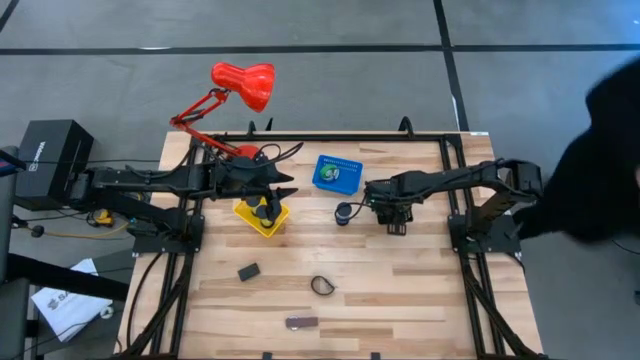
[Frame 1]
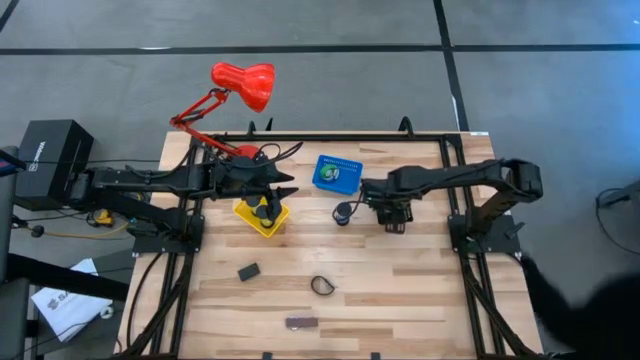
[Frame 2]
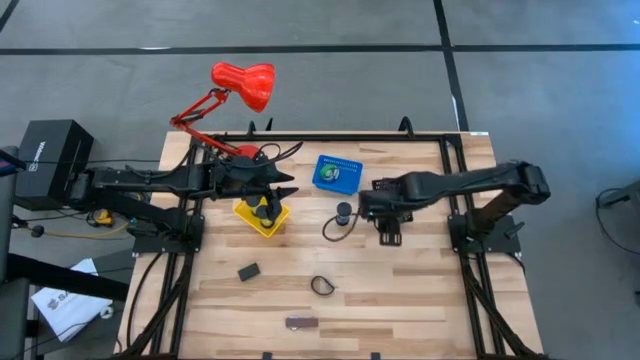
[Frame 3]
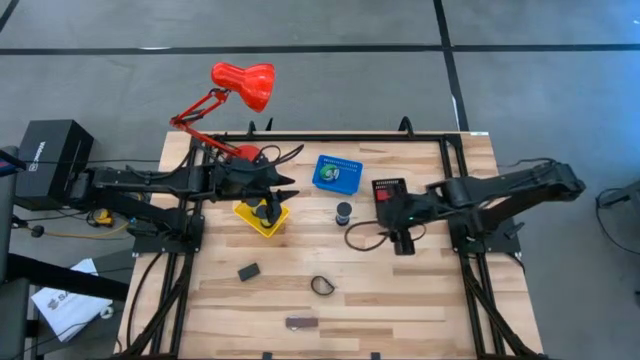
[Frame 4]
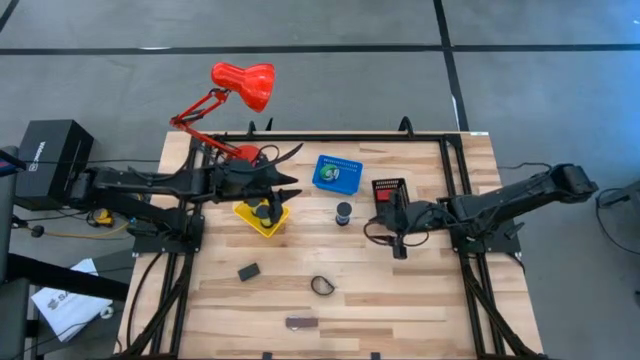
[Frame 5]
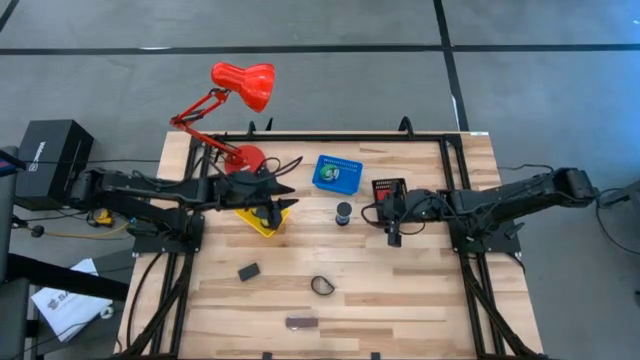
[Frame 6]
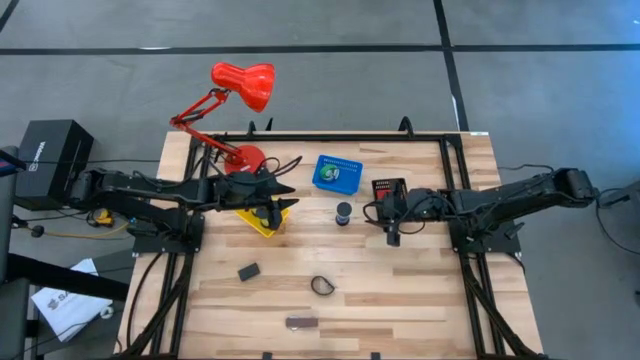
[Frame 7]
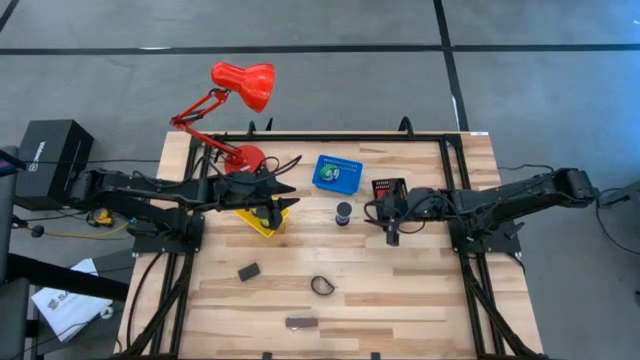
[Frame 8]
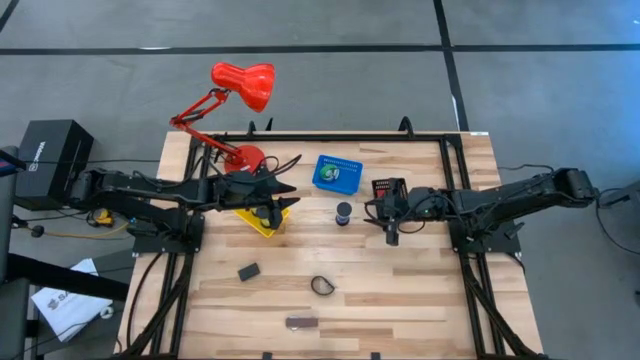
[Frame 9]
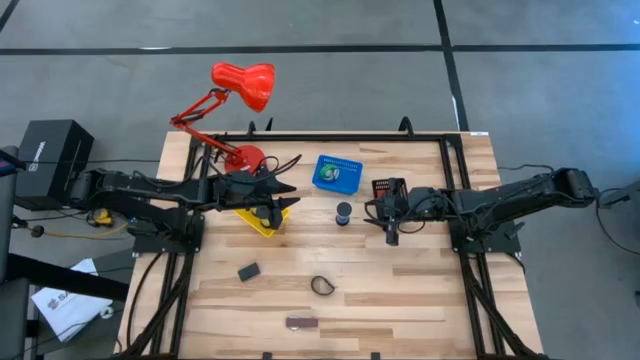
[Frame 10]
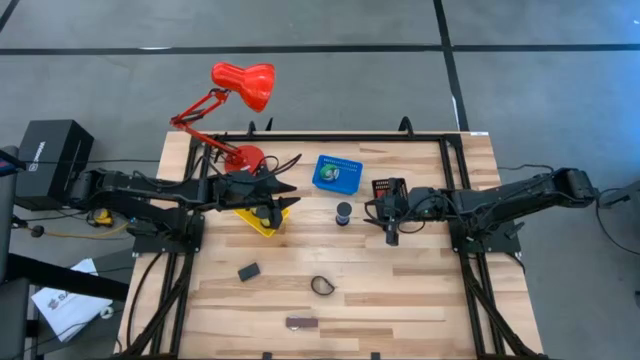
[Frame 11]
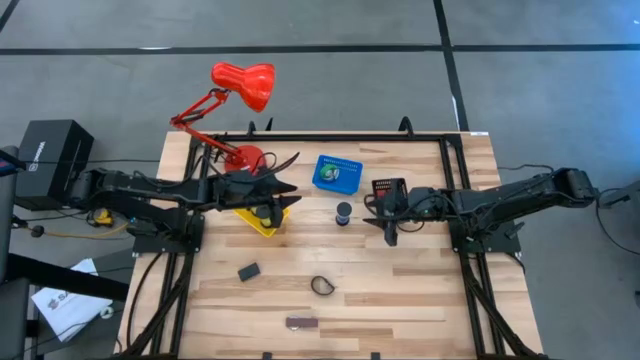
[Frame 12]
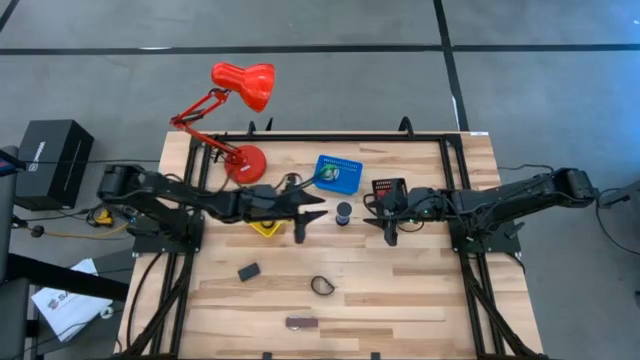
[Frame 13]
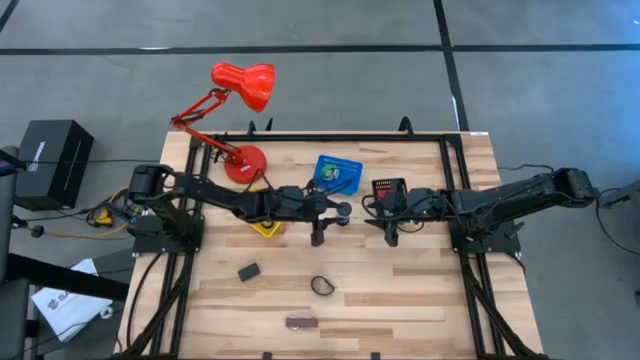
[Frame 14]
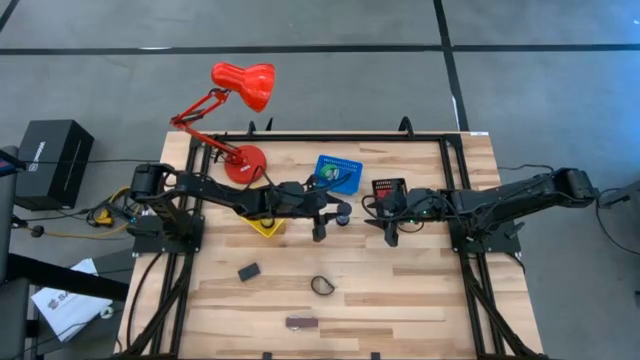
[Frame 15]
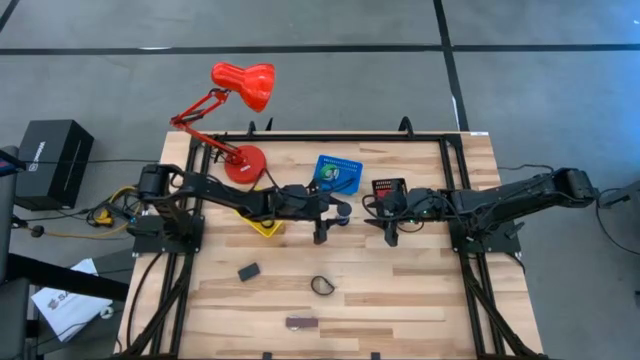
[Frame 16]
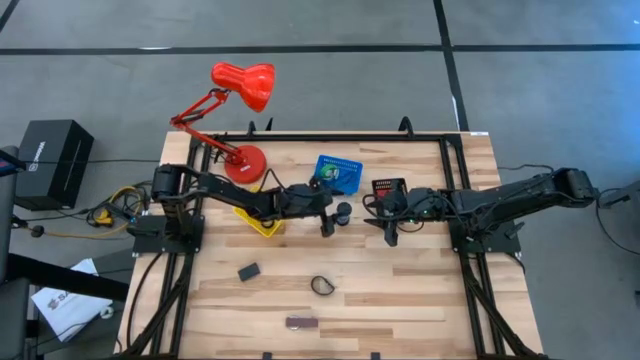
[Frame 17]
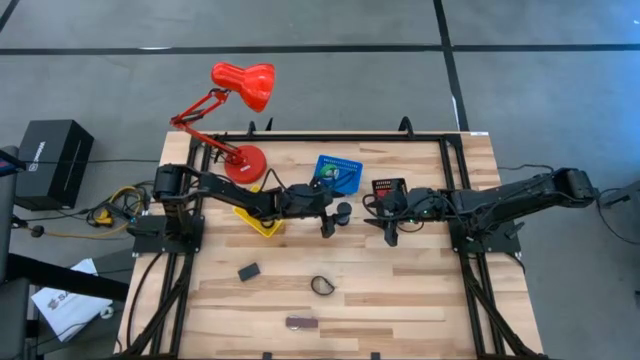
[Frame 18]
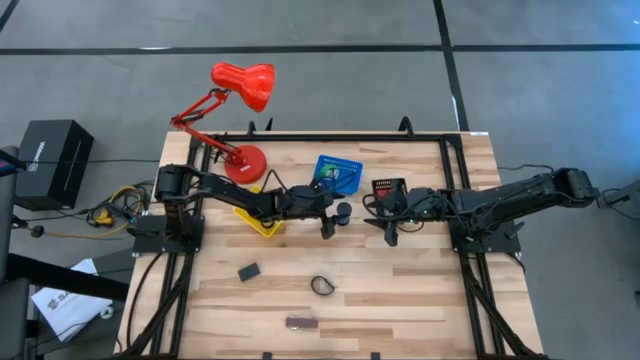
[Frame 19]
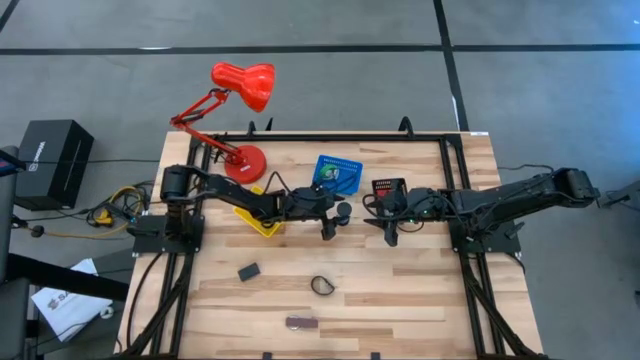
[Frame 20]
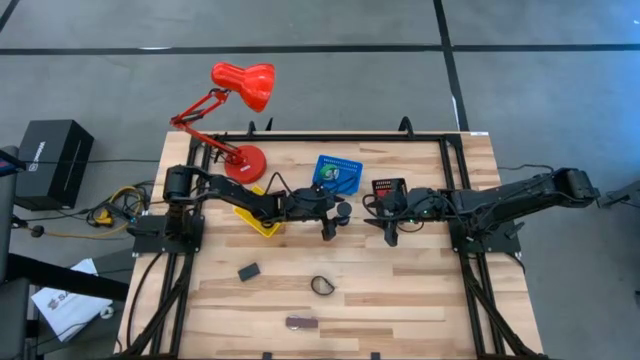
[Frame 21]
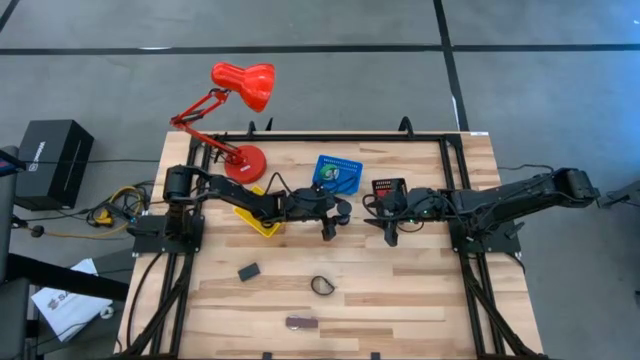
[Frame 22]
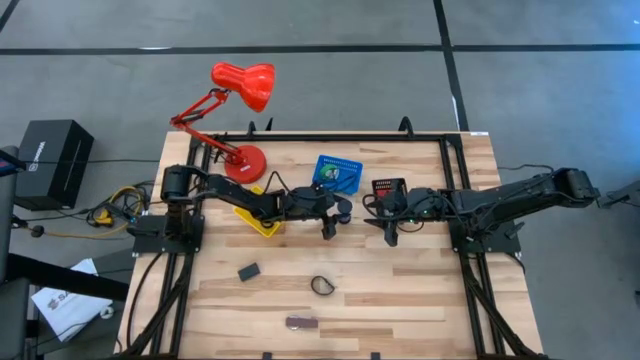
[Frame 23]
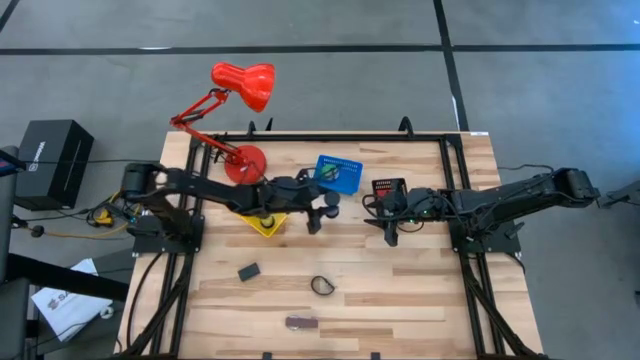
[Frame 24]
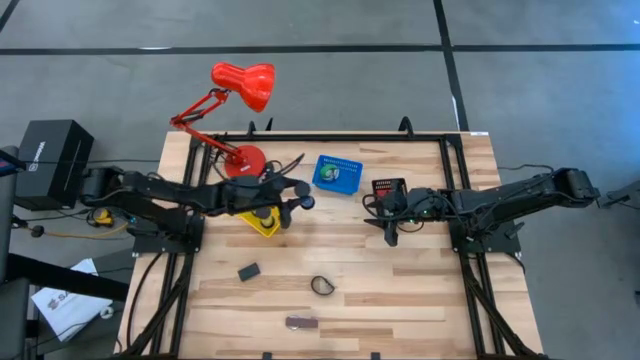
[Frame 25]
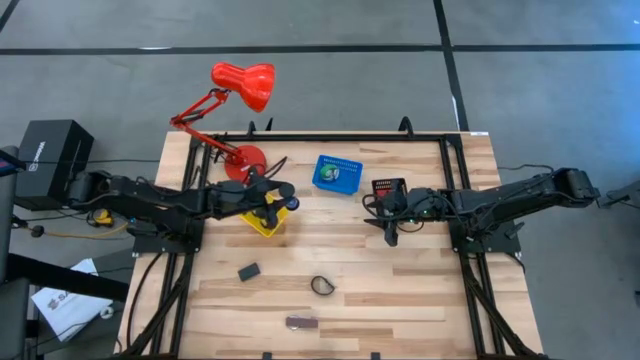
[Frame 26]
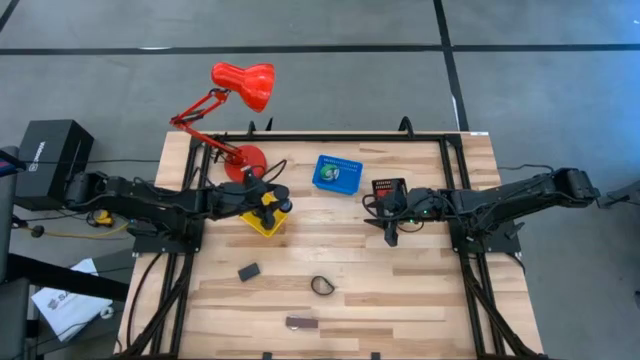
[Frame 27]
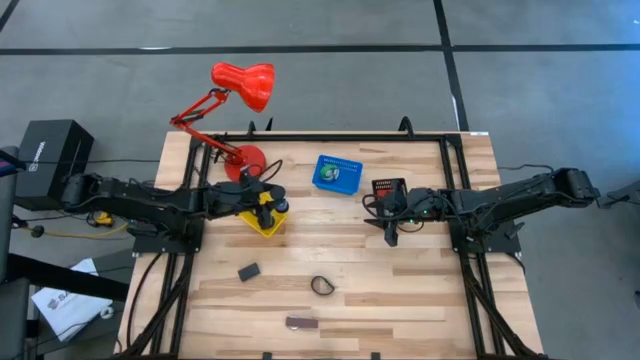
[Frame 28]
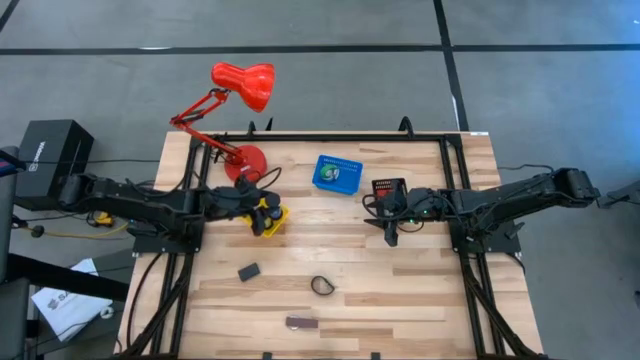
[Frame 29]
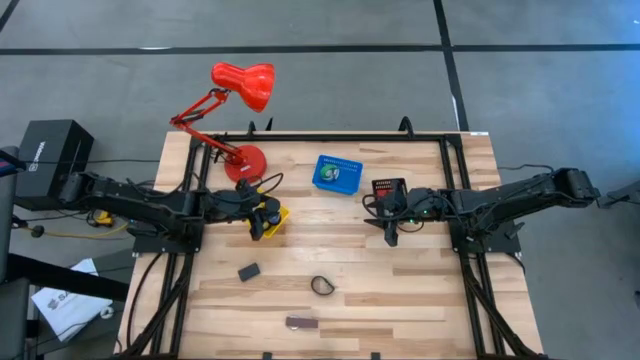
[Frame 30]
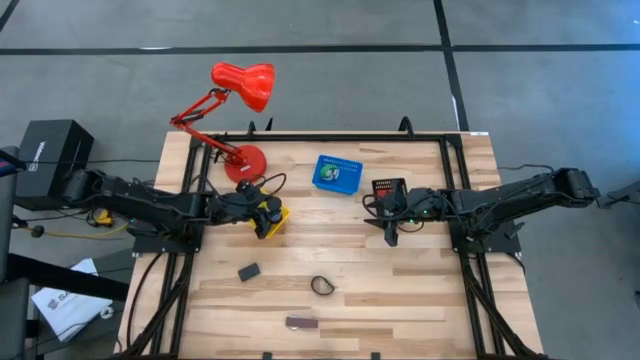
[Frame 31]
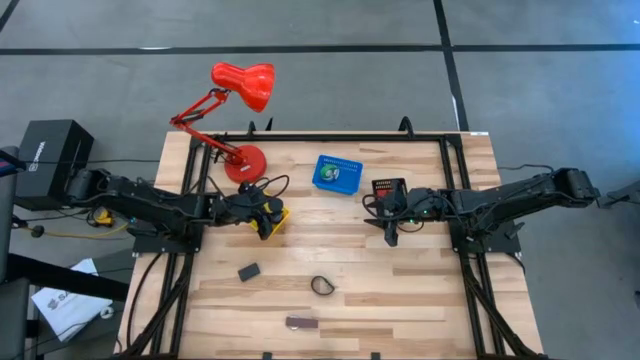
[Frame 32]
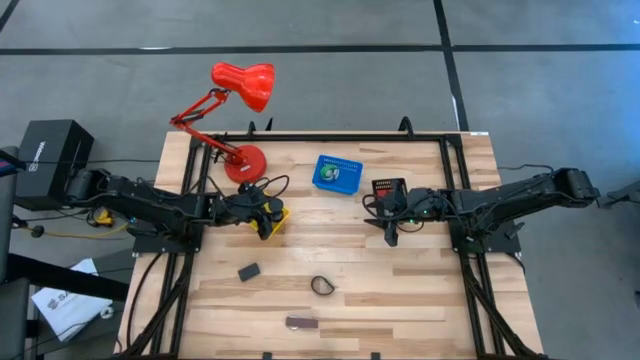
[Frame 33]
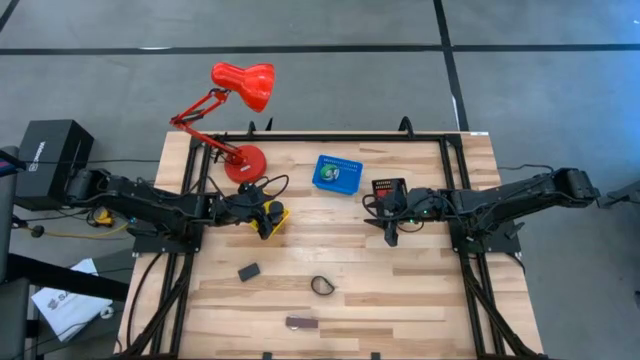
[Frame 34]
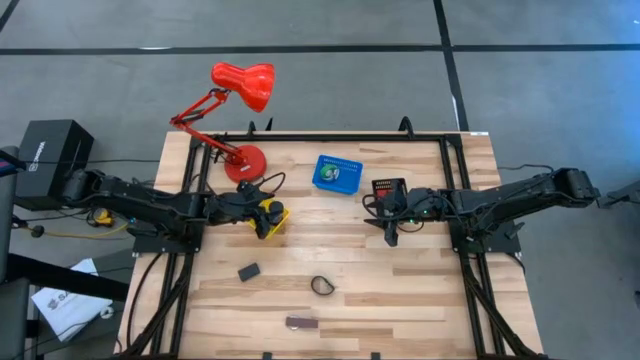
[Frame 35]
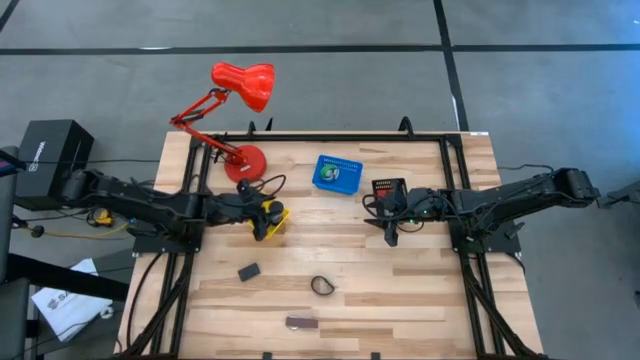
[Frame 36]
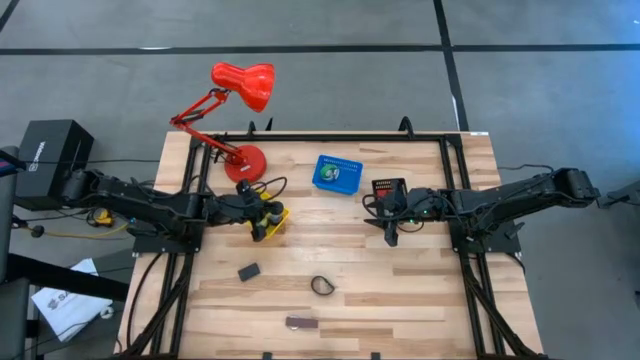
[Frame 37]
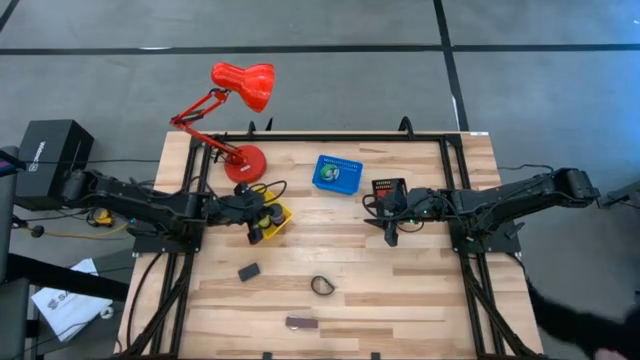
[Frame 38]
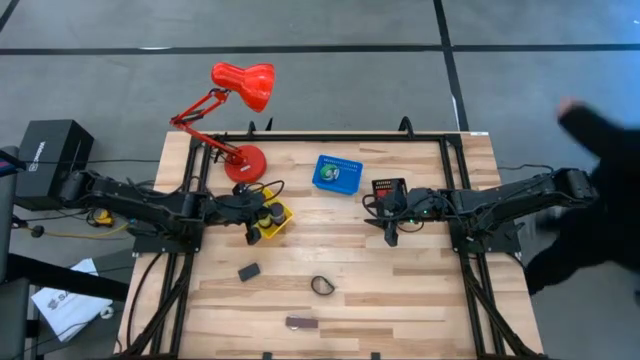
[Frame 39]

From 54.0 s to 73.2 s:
Task: Pick & Place Office items
Put the blue hourglass into the yellow bin

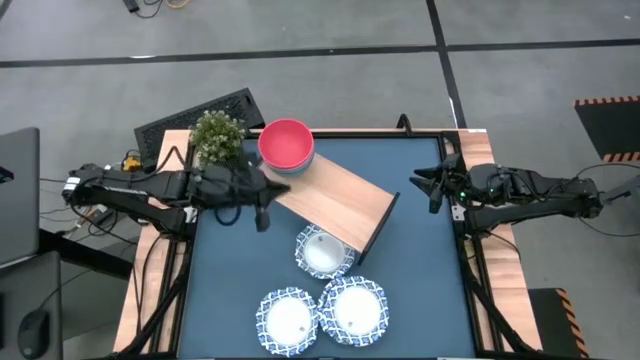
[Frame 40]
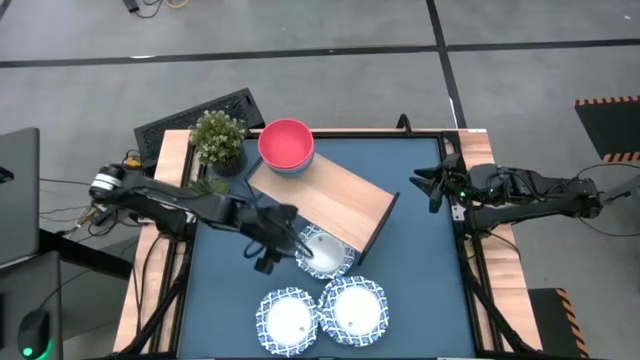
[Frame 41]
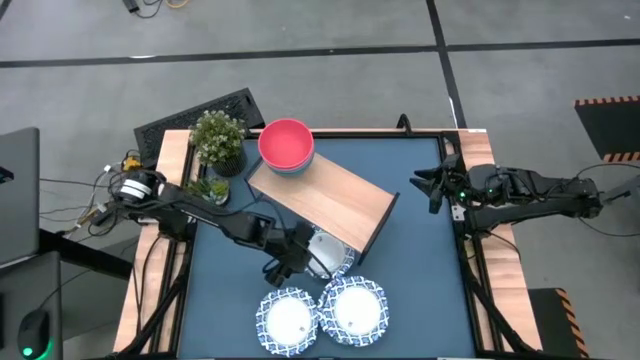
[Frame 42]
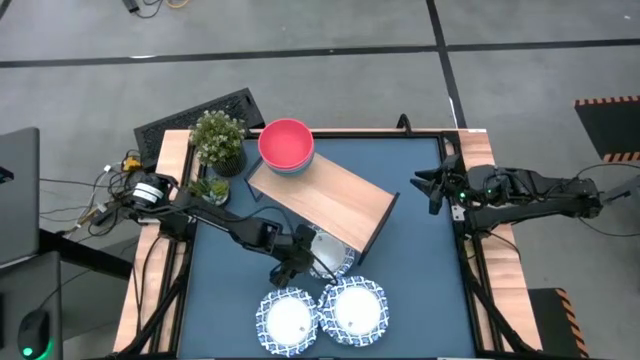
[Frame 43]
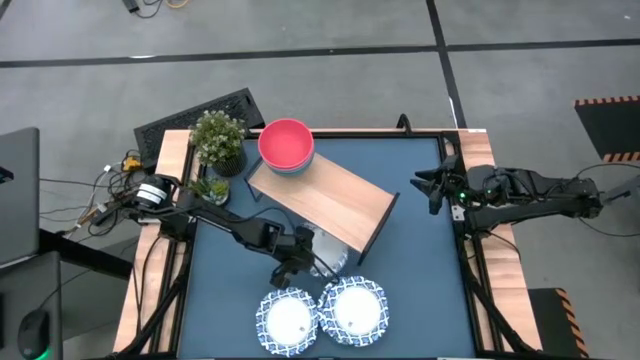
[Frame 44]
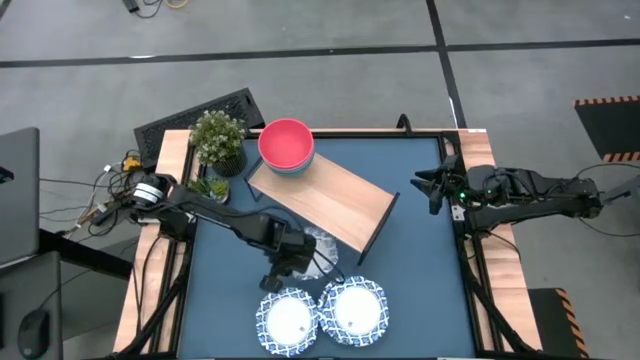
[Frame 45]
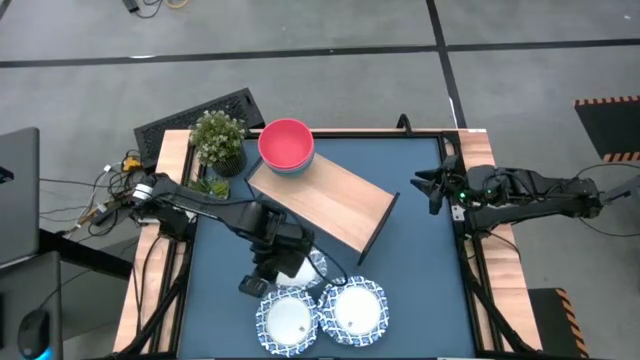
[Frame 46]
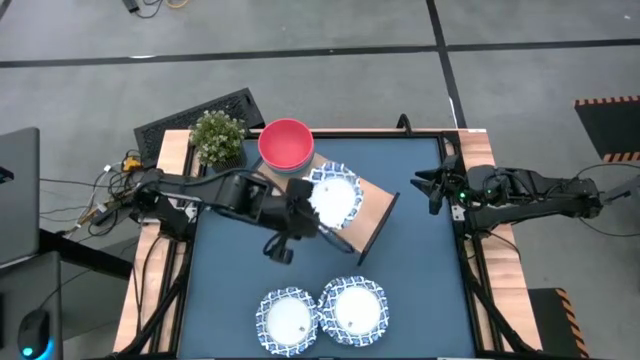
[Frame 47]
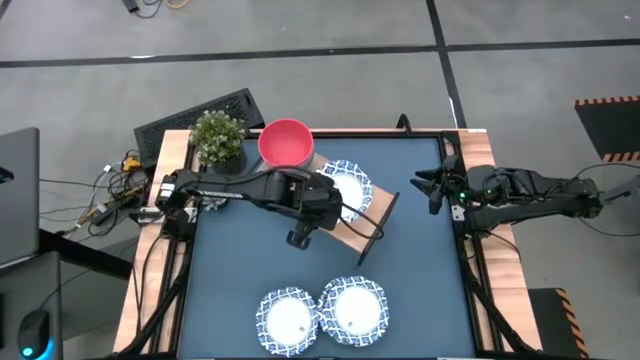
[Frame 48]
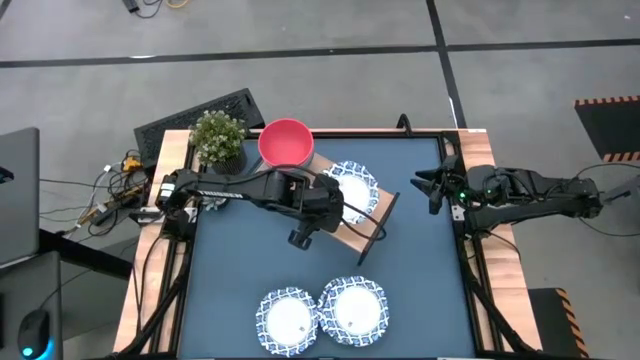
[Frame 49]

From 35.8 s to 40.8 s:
Task: Place and stack bowls onto a shelf
Put the top right white bowl on the shelf
